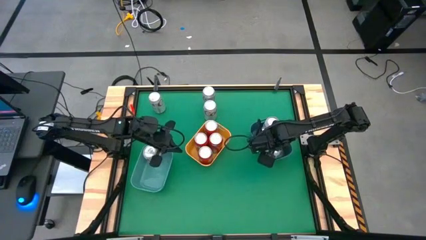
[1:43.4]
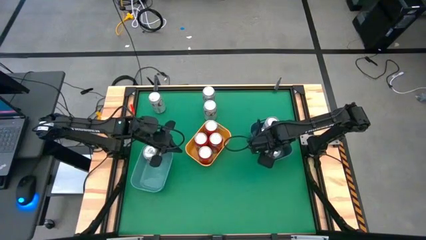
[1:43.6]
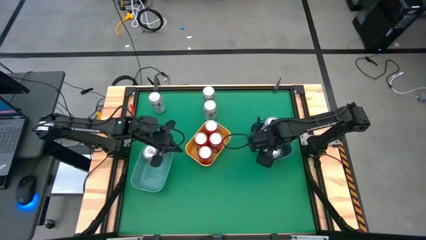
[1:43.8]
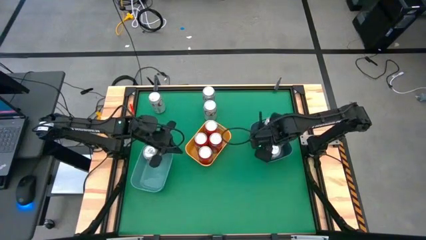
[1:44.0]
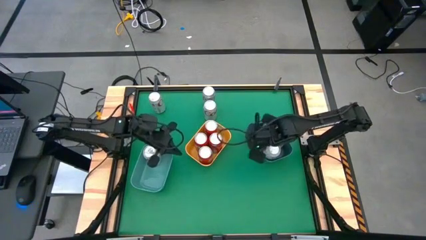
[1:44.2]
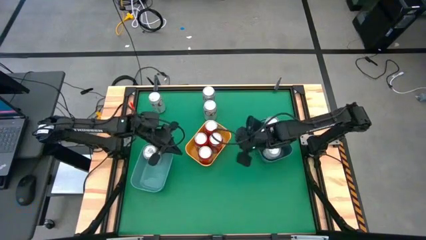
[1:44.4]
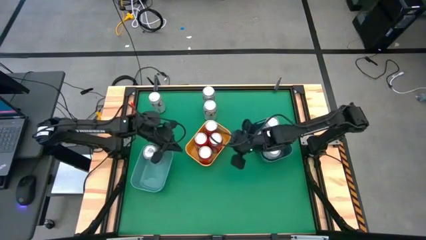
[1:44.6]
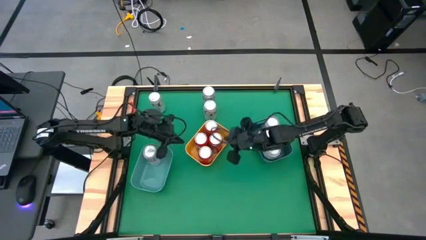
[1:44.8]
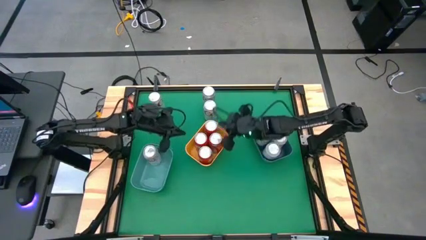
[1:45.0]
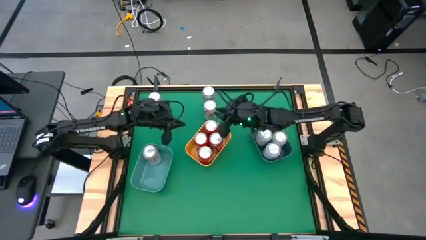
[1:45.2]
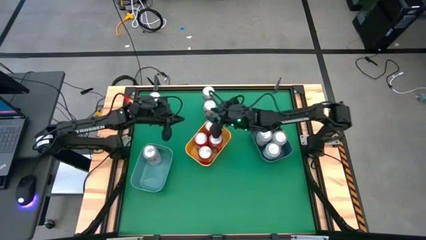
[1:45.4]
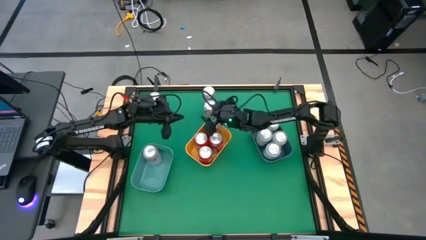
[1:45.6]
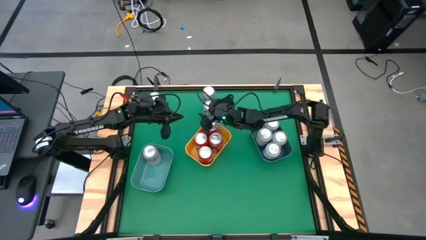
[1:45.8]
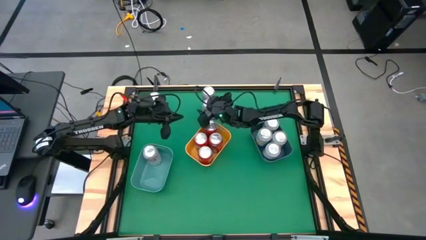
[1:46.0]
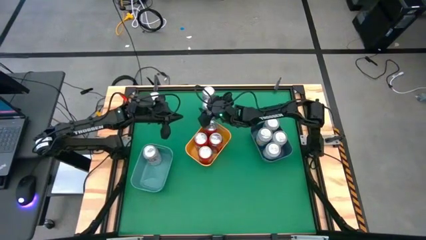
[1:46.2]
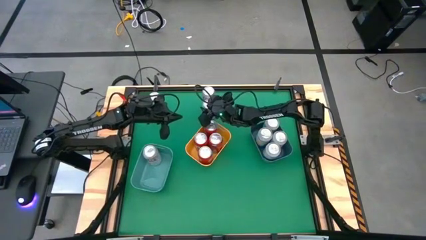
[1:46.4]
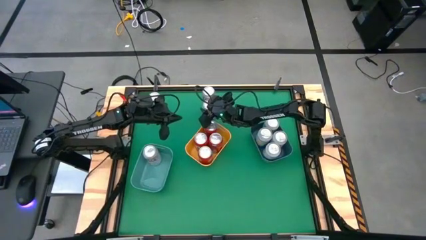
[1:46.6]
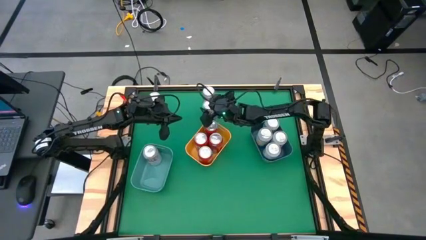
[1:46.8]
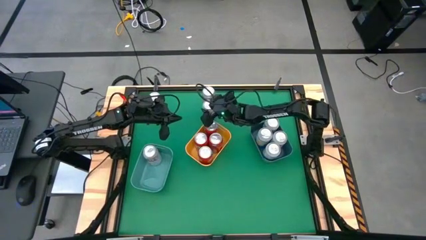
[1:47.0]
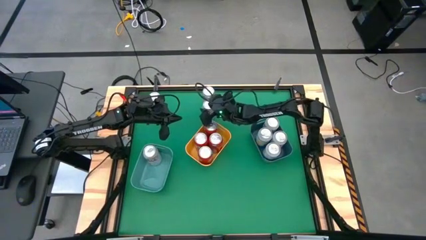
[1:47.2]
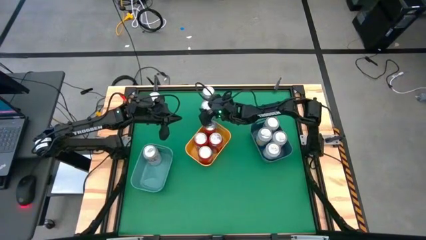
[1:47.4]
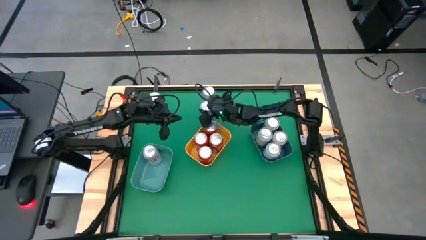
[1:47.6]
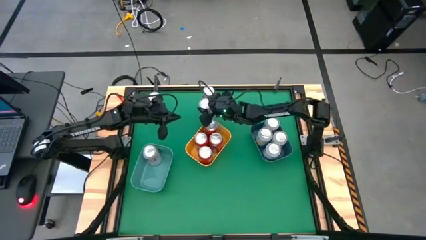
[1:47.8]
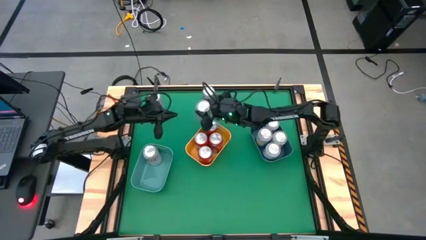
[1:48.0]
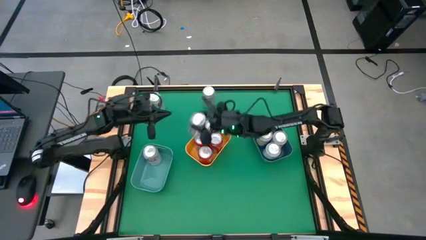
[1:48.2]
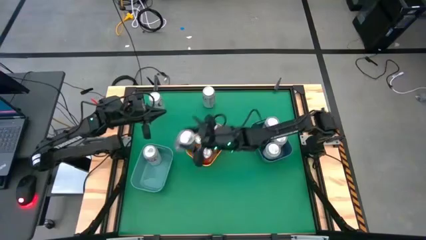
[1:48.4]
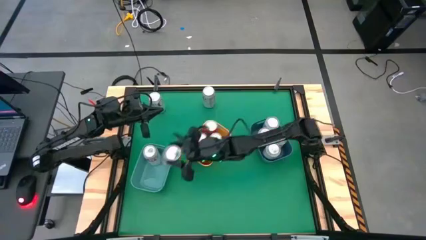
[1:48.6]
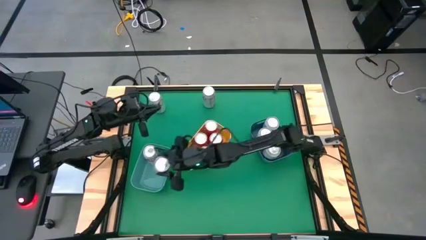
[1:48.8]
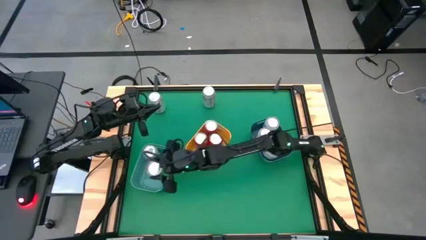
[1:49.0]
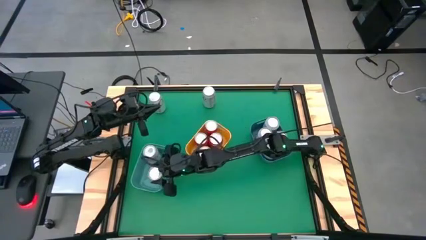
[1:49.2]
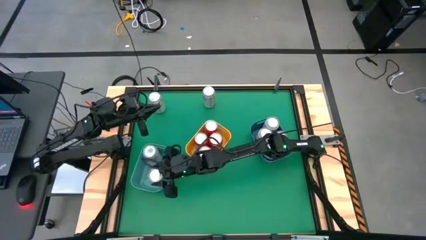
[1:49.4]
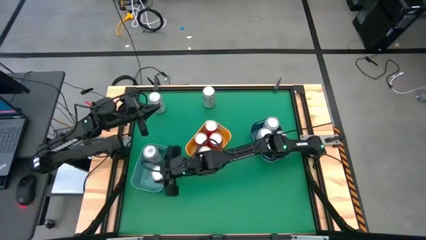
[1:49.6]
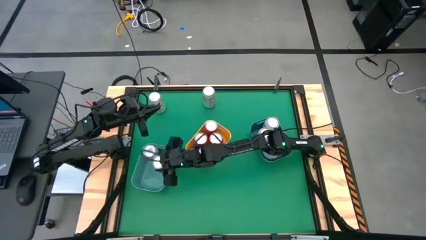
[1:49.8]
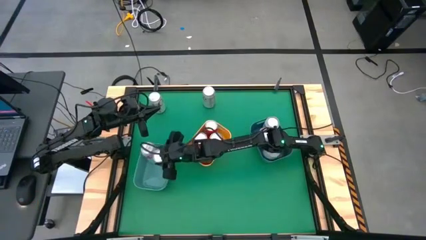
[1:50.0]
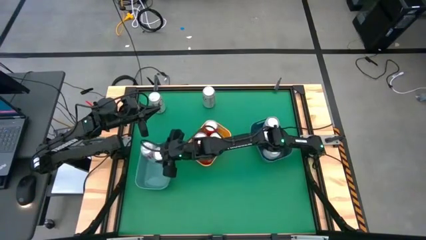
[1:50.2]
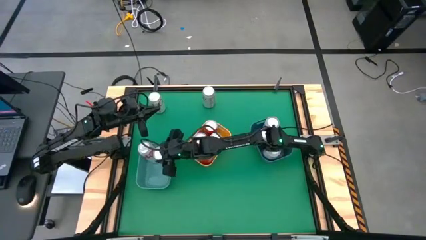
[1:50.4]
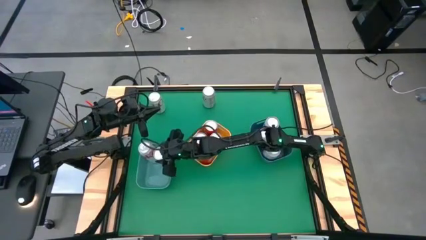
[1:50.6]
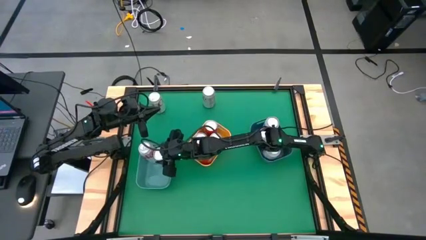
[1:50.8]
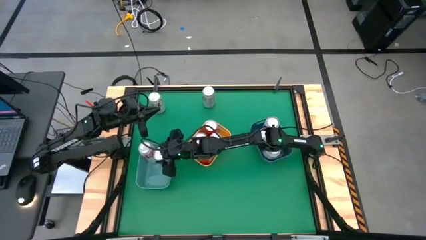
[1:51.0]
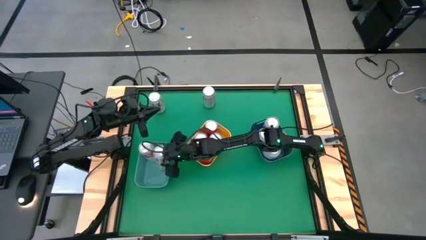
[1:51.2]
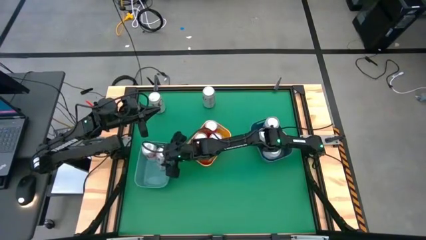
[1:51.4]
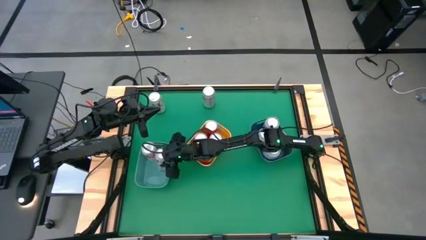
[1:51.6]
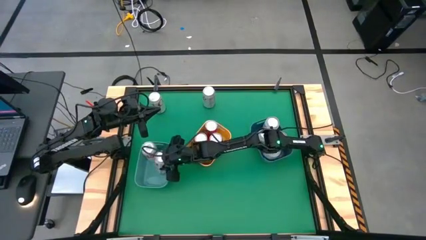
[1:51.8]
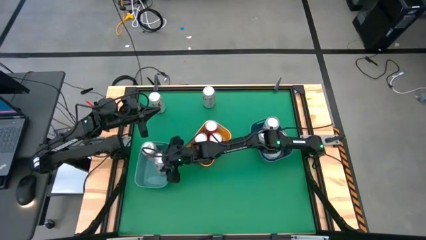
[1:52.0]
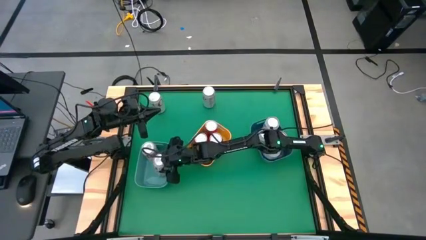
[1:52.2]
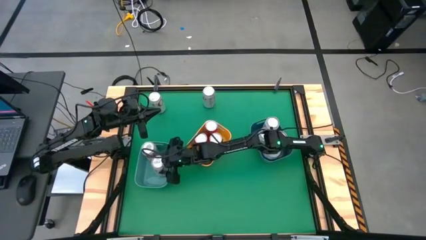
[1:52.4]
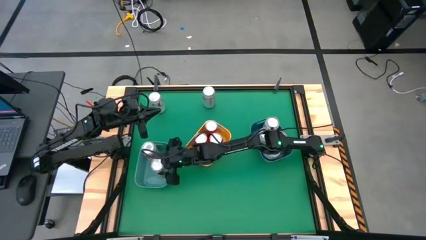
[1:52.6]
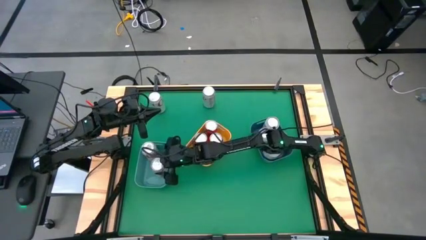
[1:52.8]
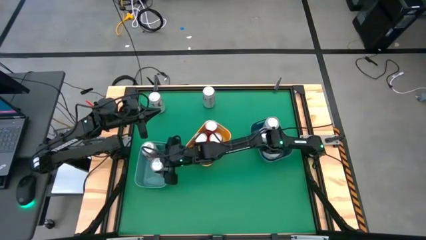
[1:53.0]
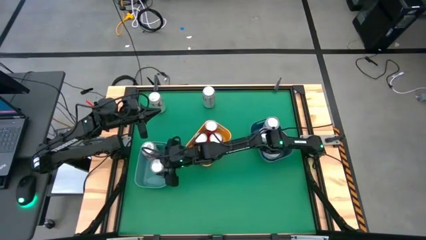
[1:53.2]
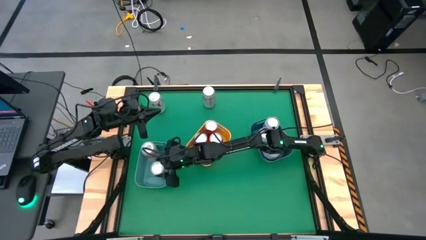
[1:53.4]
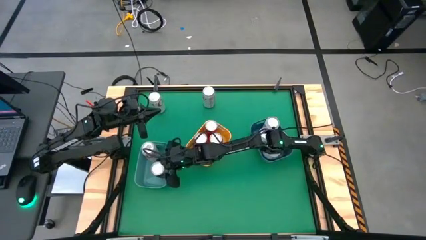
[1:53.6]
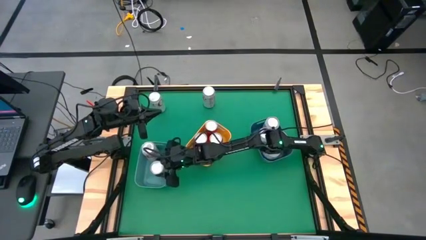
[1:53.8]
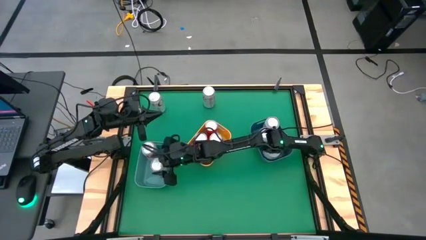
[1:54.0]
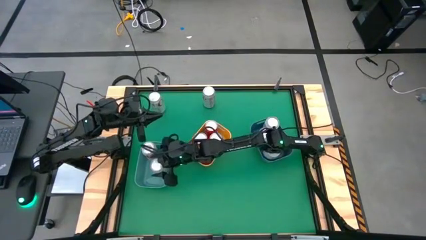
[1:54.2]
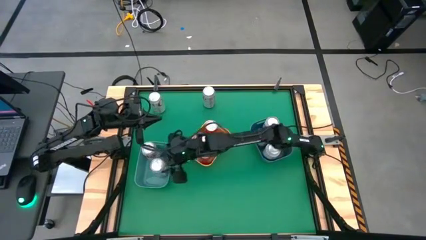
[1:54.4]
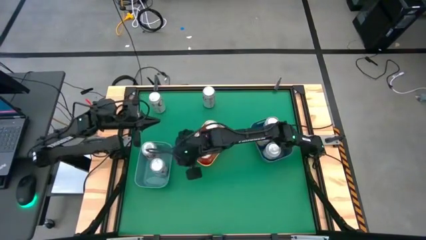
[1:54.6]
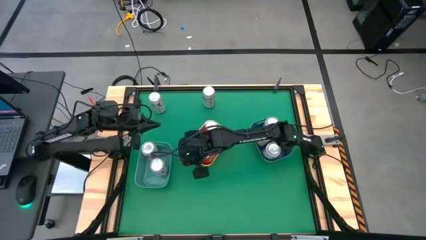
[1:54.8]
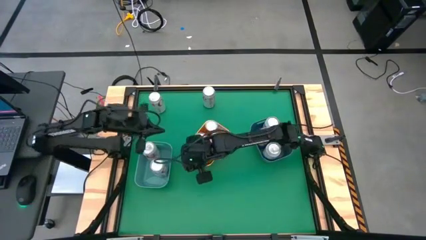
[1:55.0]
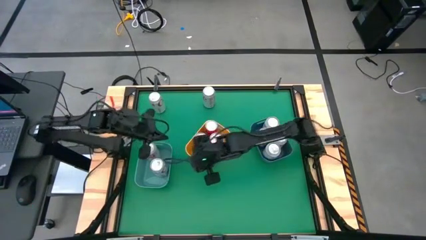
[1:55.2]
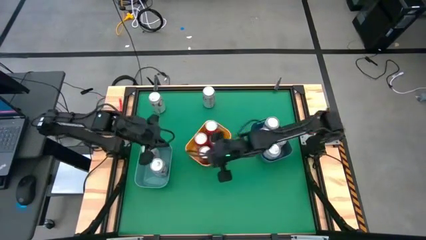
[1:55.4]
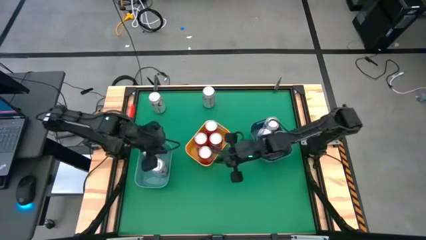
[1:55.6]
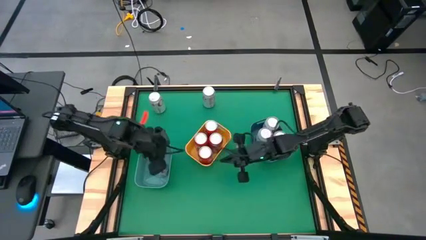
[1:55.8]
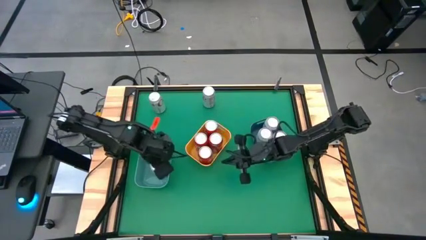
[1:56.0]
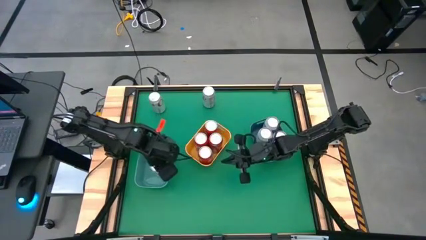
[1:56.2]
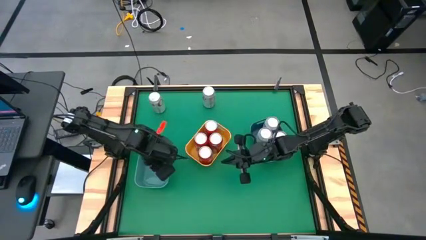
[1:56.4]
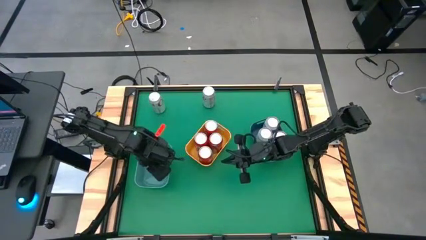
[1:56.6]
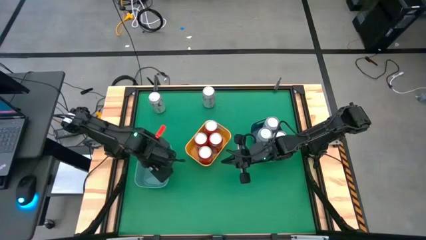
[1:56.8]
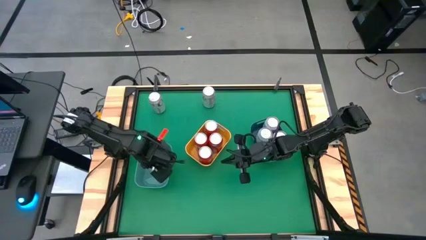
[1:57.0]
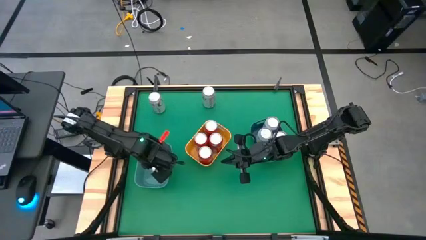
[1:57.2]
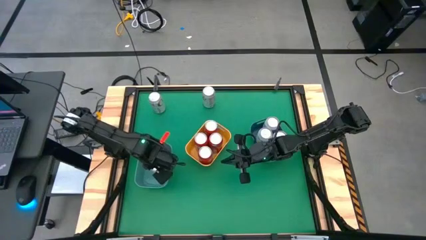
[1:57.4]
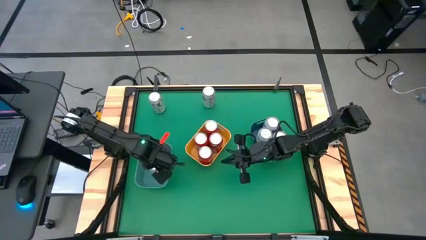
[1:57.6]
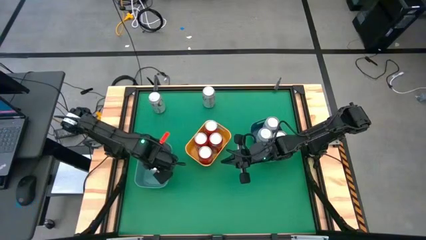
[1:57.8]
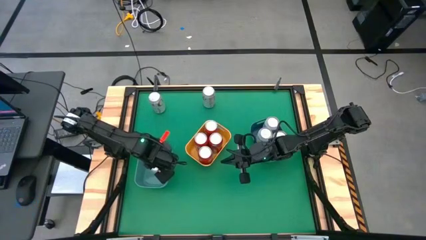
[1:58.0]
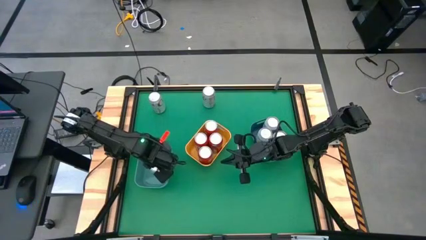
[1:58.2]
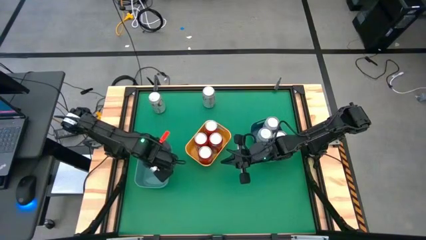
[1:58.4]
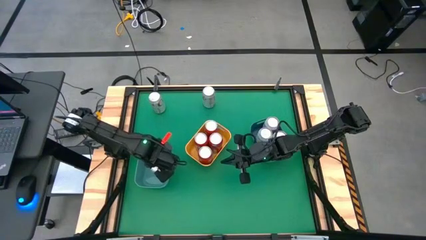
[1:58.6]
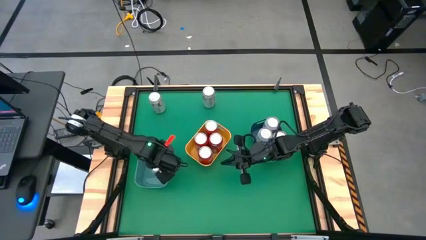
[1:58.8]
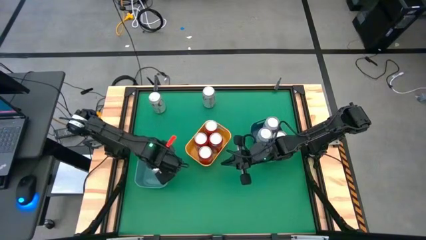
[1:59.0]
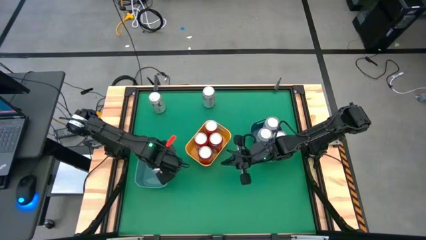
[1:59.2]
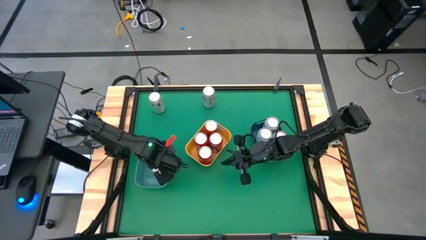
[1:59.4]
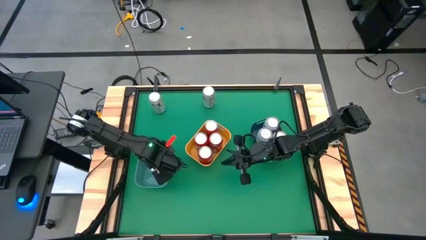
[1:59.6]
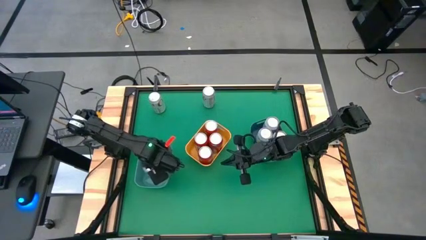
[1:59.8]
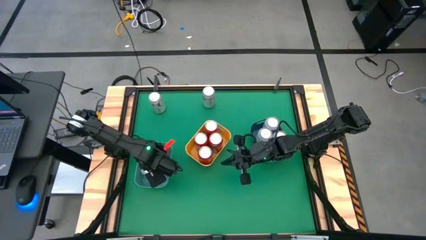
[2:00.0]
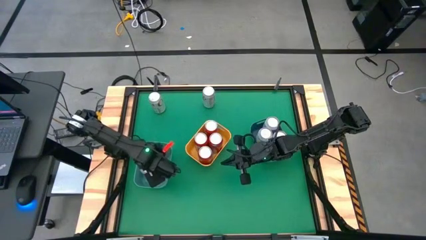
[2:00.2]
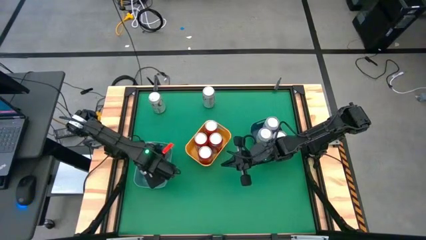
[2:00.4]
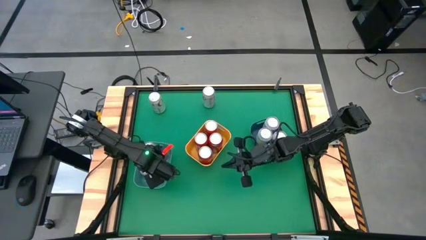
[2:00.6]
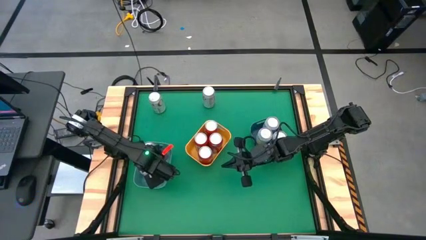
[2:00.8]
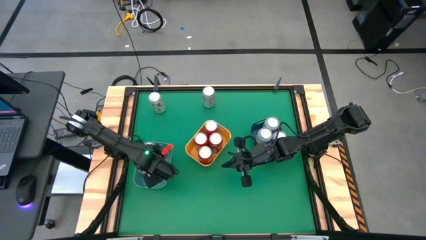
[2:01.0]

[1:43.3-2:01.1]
Task: Sort soda cans
Put the bottom right white soda can into the green bin
